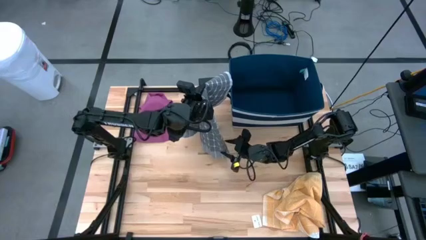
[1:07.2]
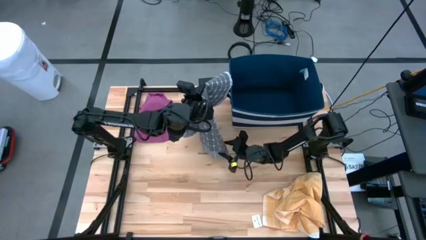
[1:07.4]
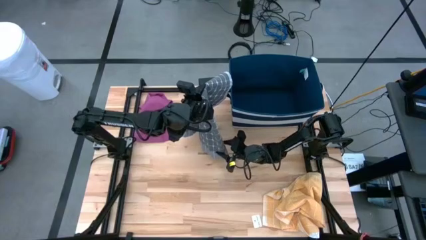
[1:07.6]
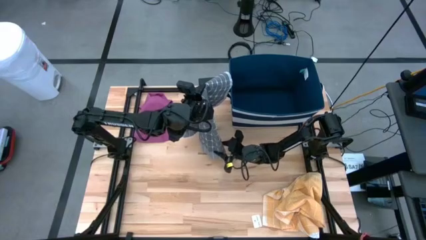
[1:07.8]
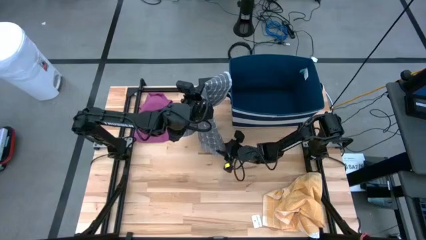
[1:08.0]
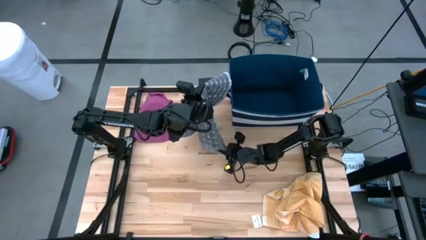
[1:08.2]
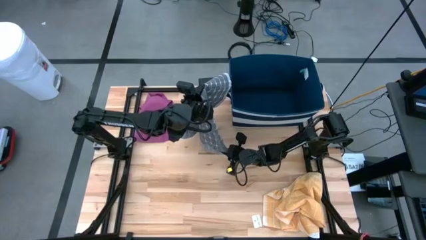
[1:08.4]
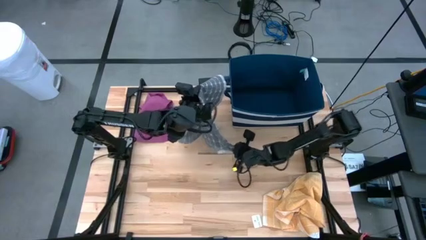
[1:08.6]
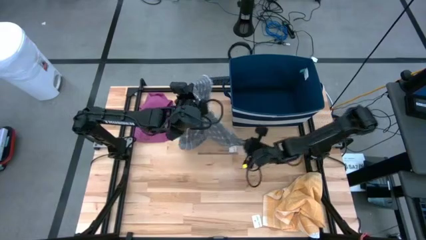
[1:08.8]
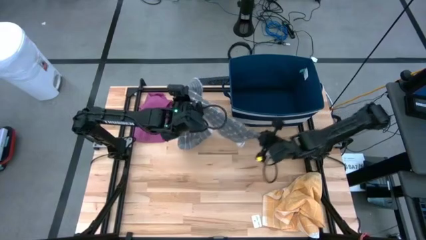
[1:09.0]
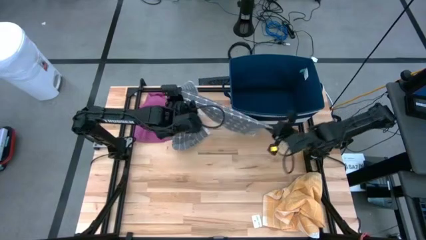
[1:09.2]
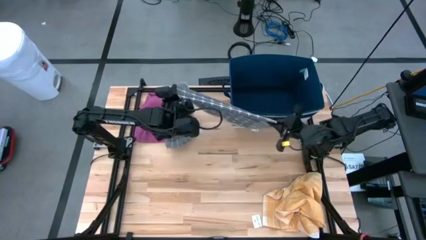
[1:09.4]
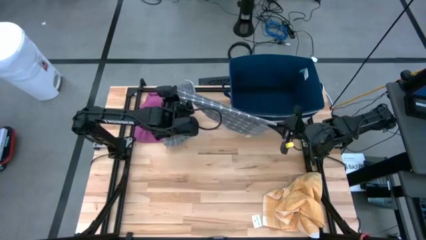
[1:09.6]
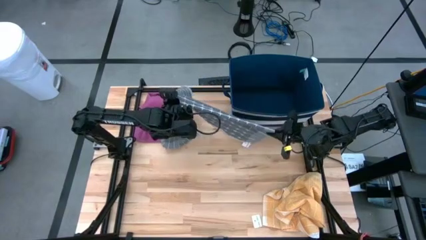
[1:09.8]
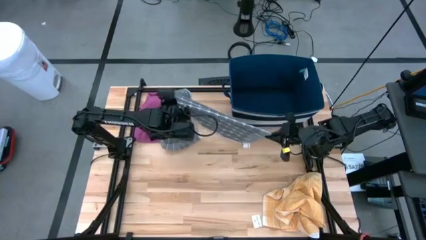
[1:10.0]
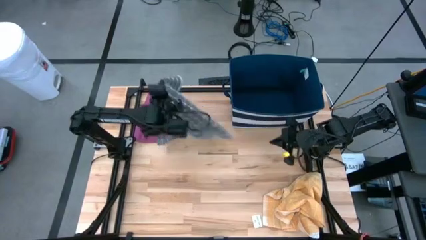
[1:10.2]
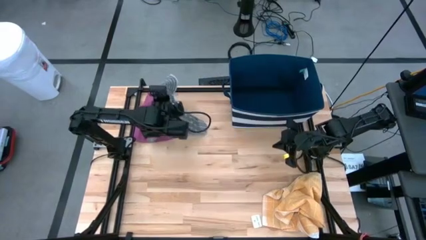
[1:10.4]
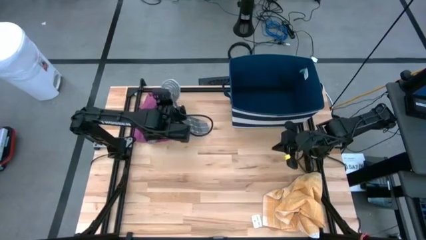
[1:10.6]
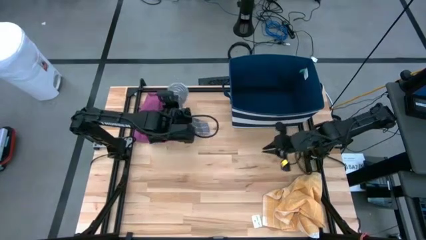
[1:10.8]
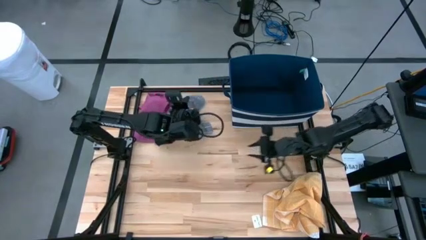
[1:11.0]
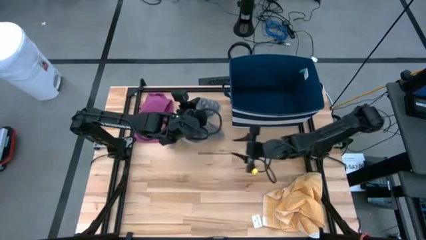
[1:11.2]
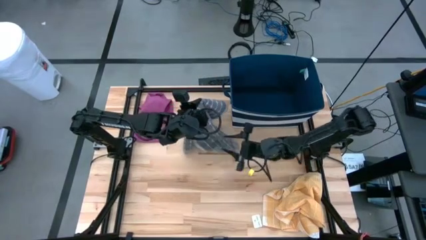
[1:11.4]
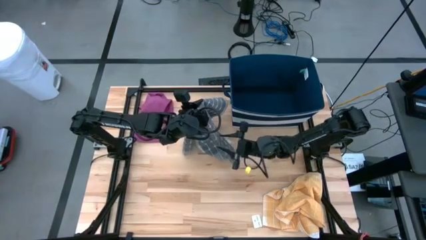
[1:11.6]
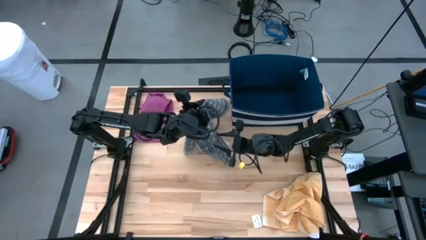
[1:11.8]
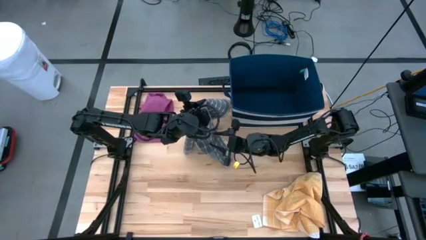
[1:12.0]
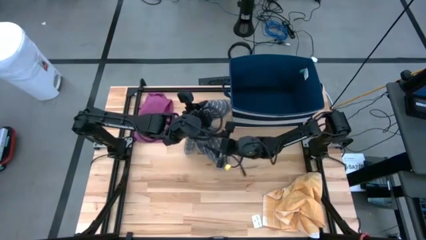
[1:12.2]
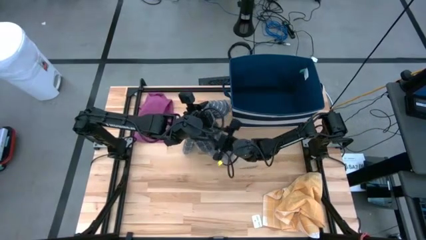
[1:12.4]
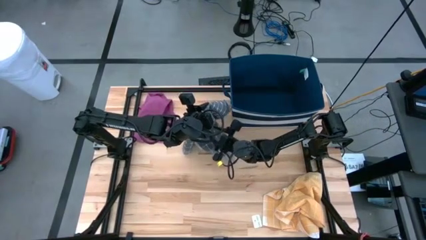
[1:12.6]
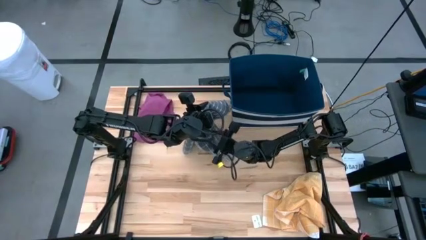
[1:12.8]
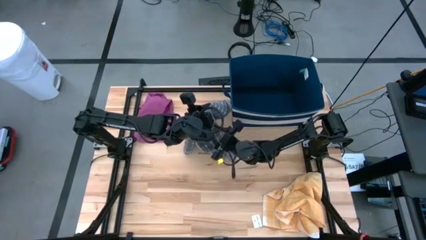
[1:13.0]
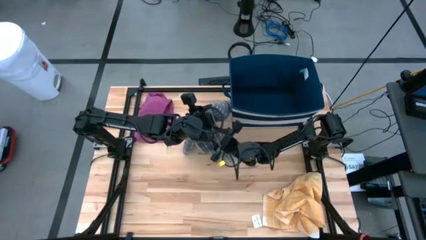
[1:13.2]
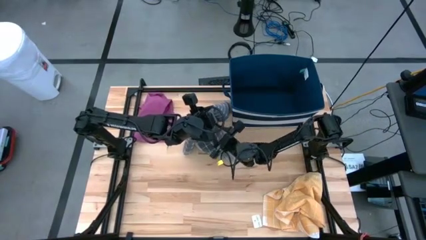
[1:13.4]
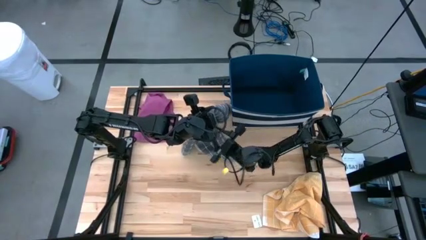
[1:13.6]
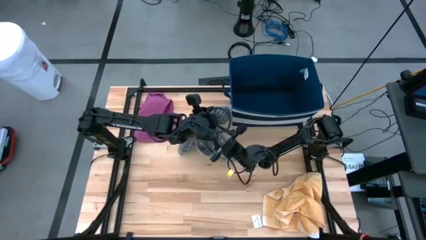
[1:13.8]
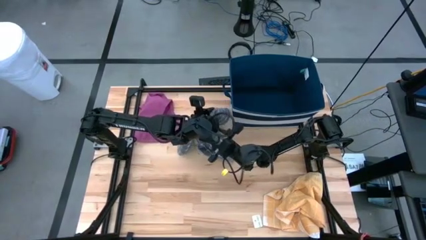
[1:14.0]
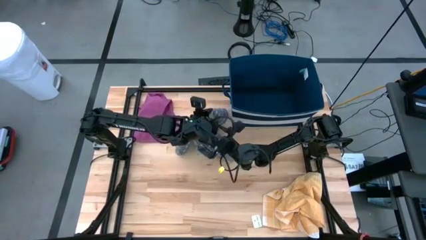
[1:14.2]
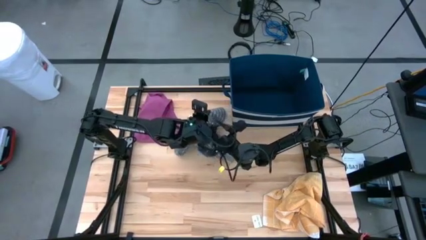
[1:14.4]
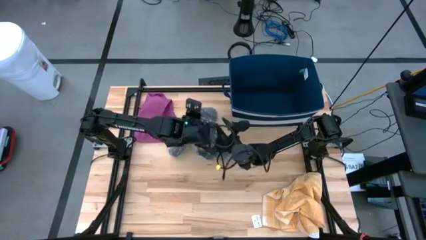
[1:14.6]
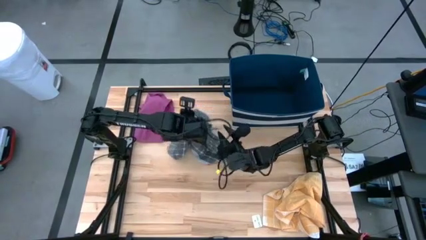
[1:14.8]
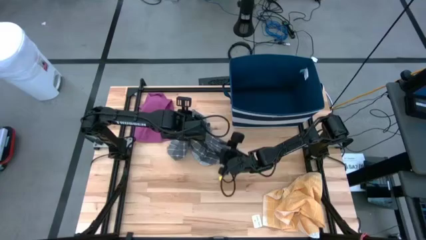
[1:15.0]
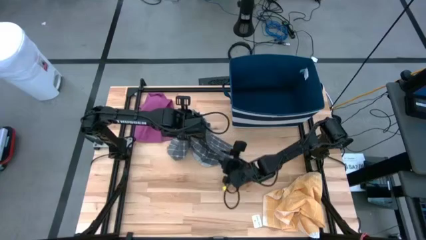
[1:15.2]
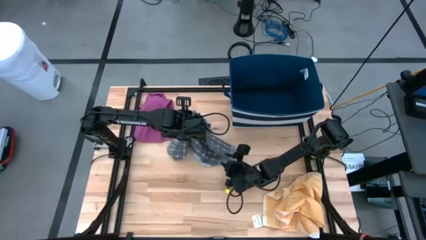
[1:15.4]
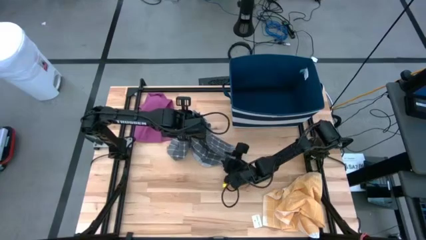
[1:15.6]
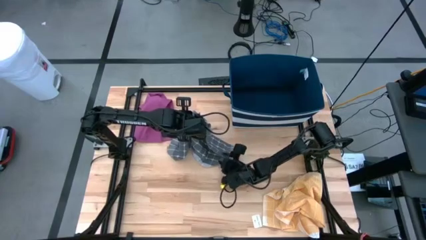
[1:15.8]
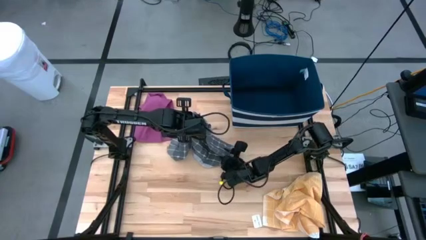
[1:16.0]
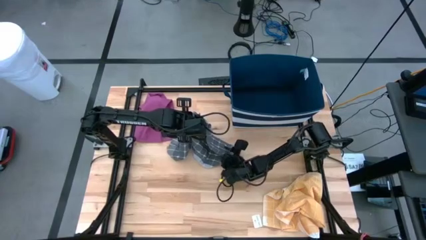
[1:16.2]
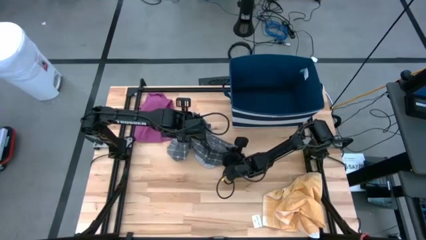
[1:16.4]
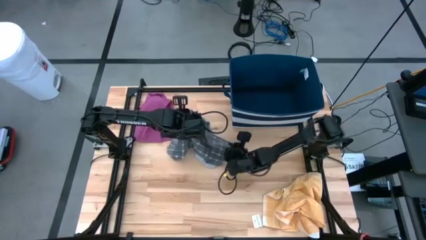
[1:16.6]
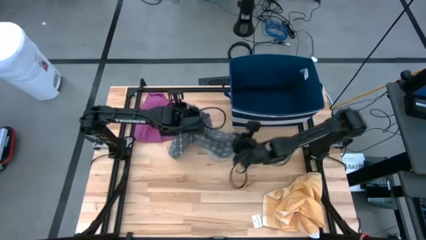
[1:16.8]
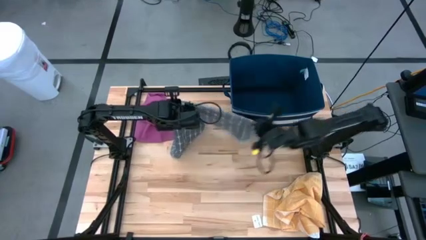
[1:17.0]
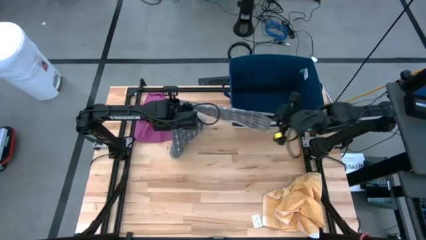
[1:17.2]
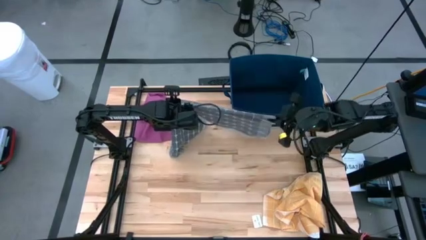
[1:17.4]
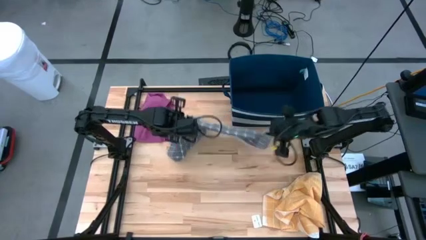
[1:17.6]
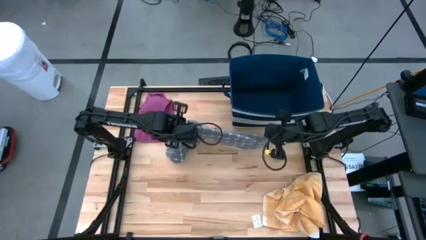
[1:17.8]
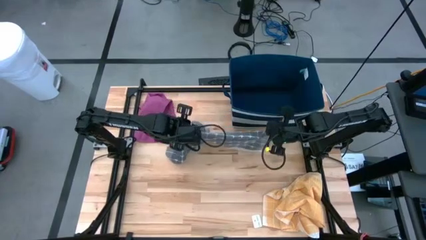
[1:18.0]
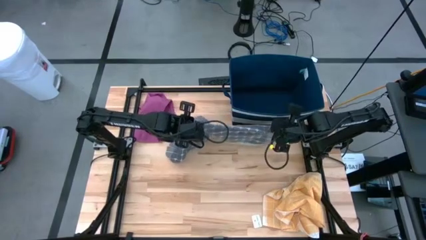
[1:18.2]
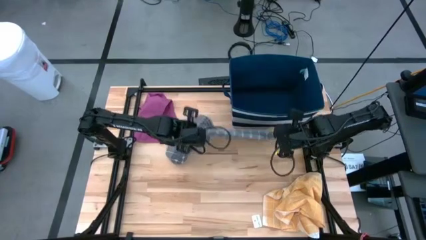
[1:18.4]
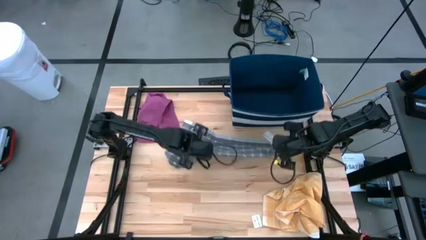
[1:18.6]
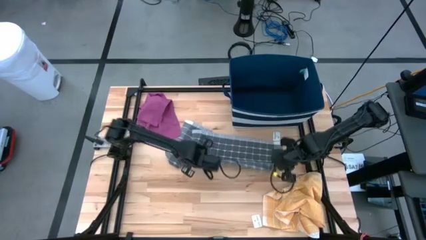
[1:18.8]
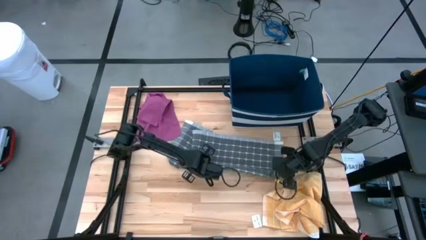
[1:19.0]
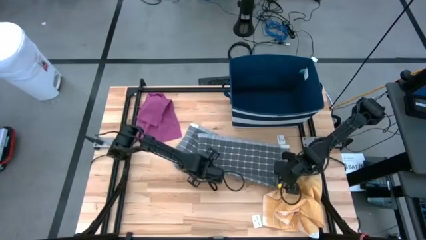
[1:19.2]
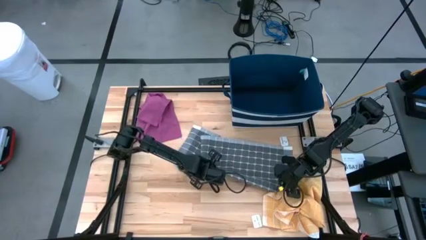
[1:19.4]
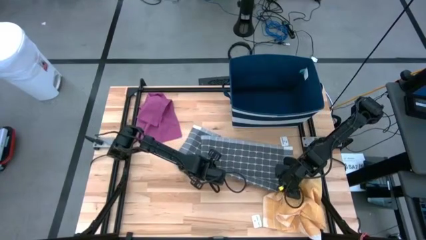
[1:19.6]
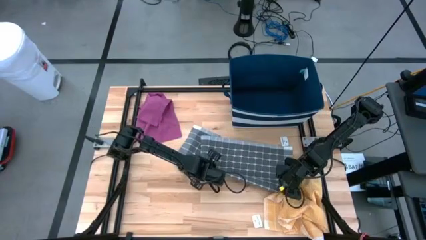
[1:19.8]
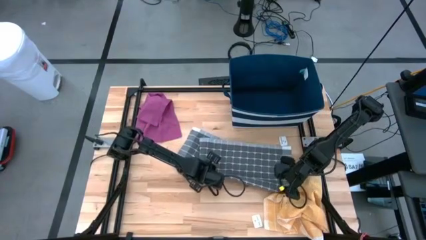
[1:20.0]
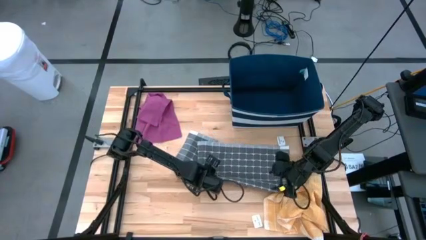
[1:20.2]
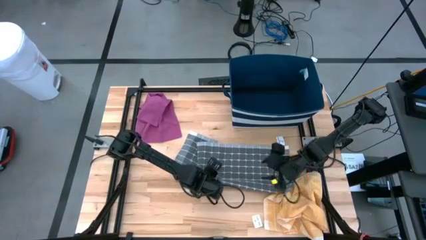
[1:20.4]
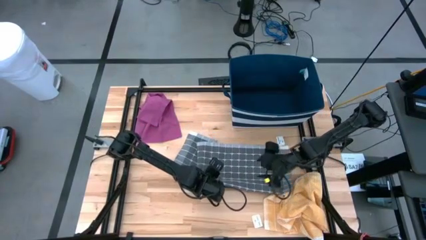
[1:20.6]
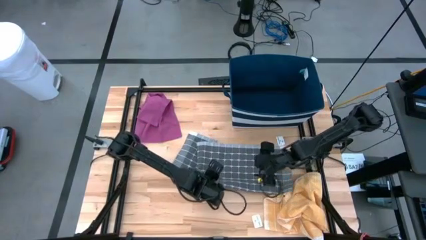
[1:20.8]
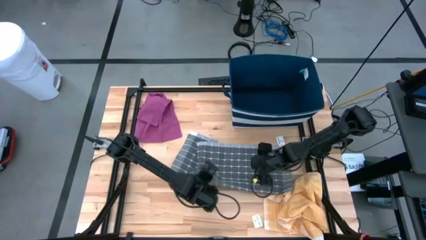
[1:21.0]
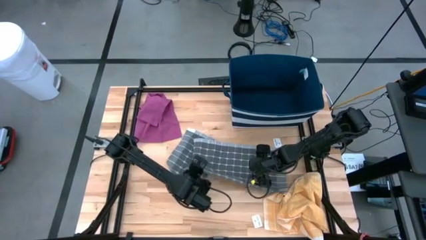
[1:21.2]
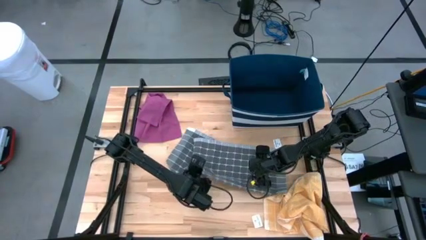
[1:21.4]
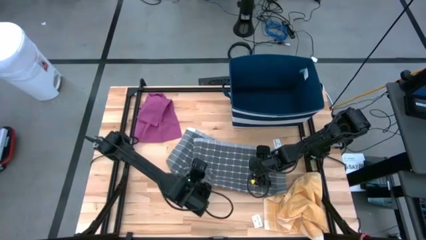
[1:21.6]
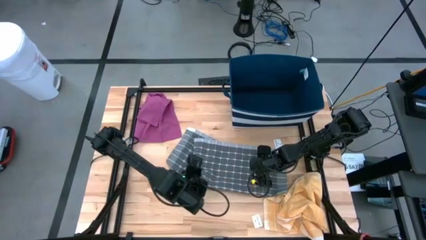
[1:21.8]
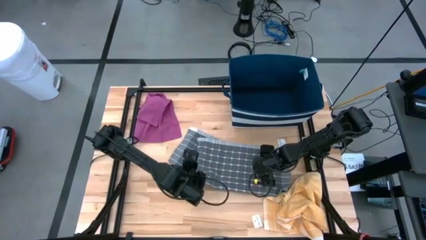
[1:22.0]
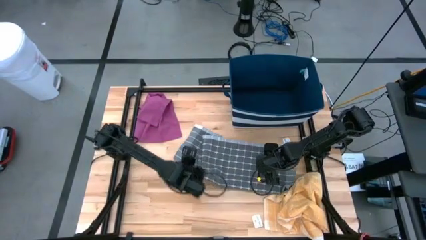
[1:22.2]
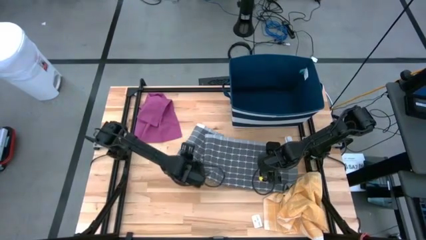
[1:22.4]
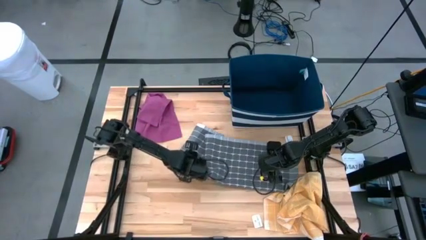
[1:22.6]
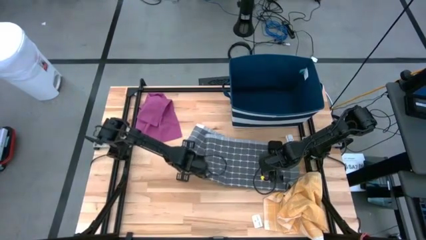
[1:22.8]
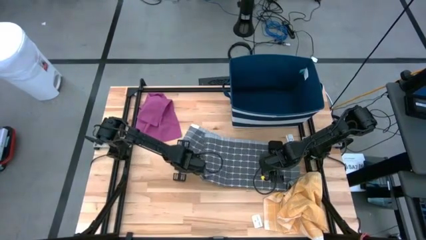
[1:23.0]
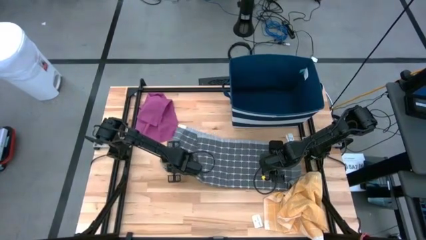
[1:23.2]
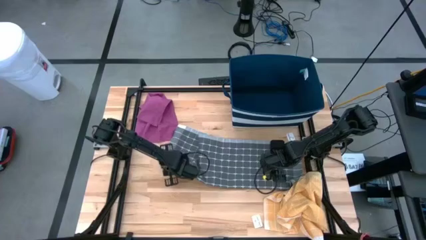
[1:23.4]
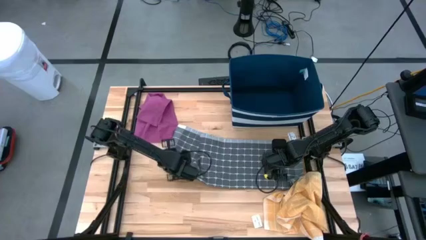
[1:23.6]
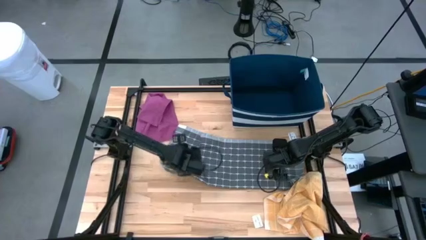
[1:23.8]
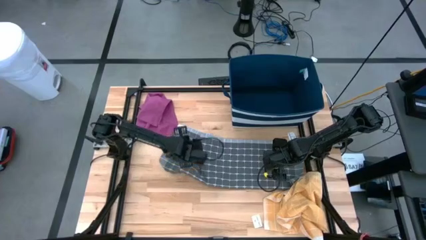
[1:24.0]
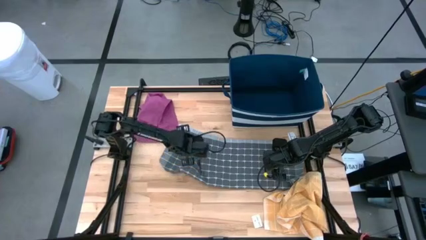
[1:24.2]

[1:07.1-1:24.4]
Task: Fold towel
Fold the gray checkered towel
